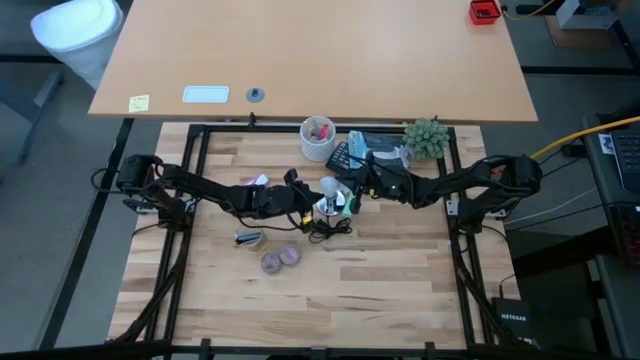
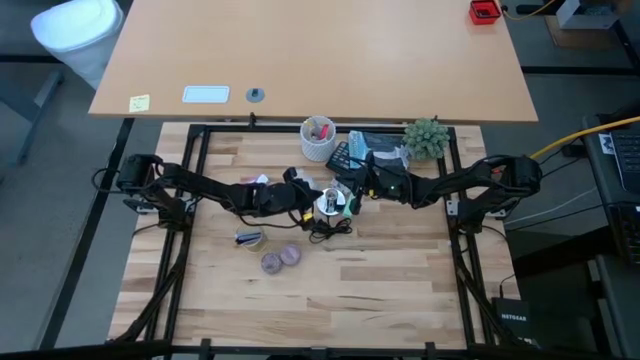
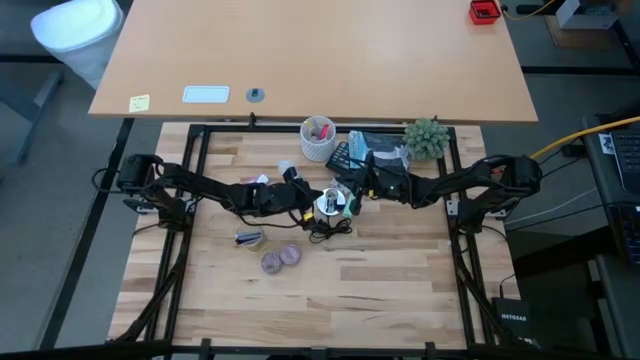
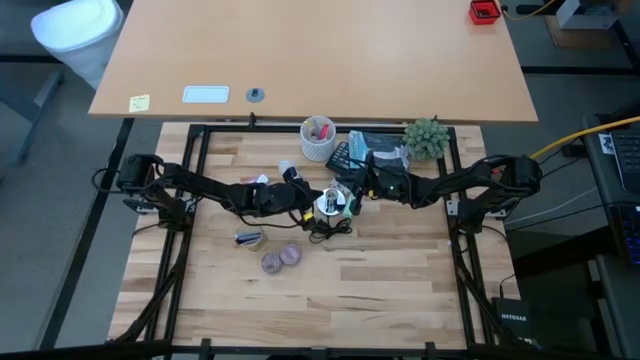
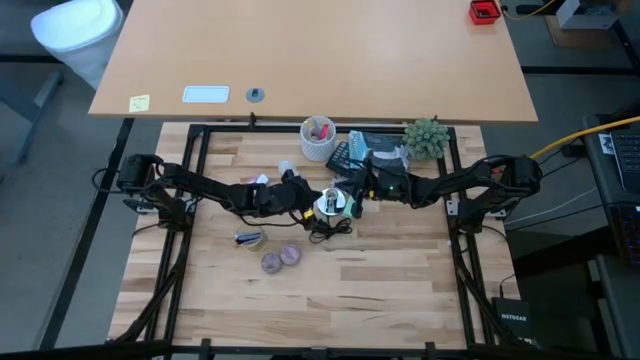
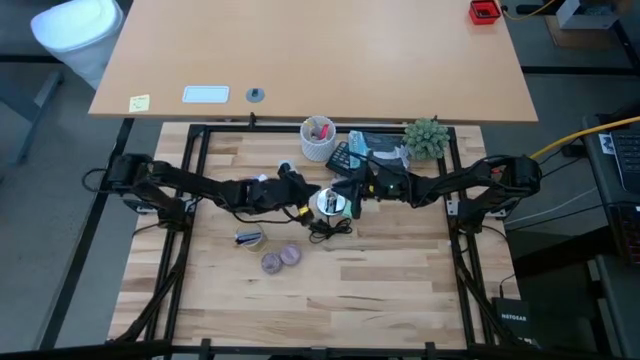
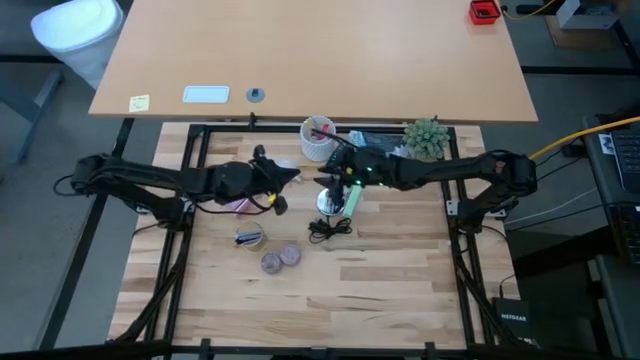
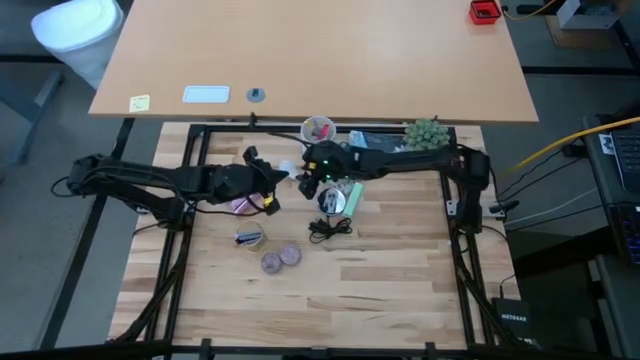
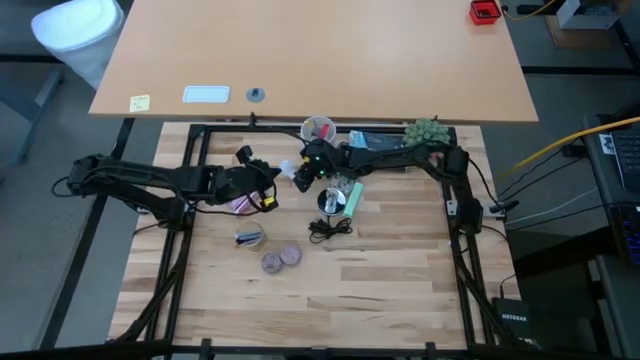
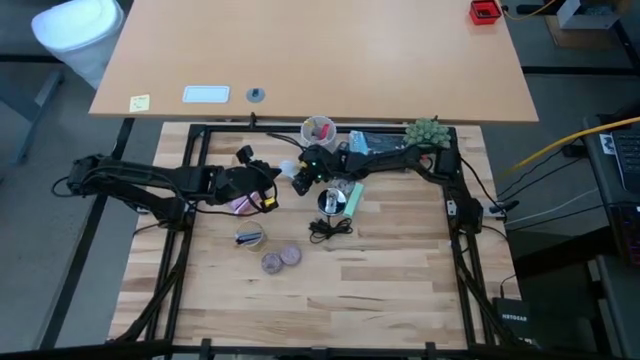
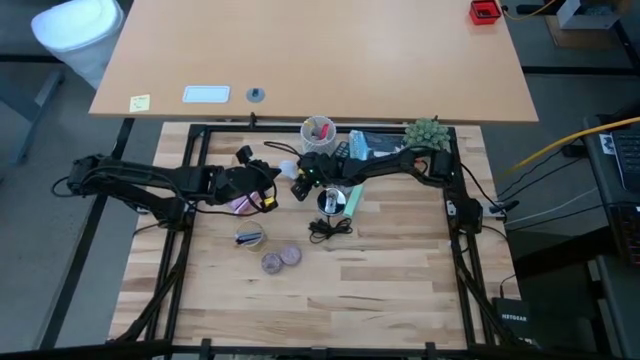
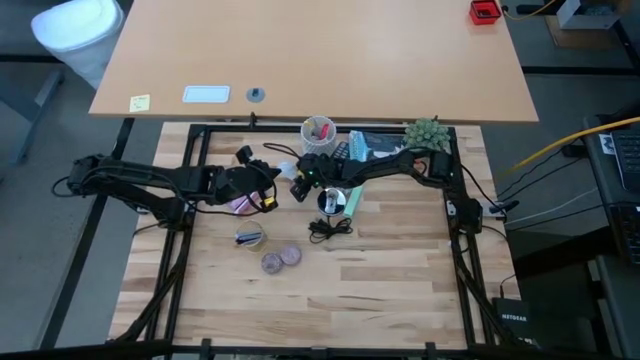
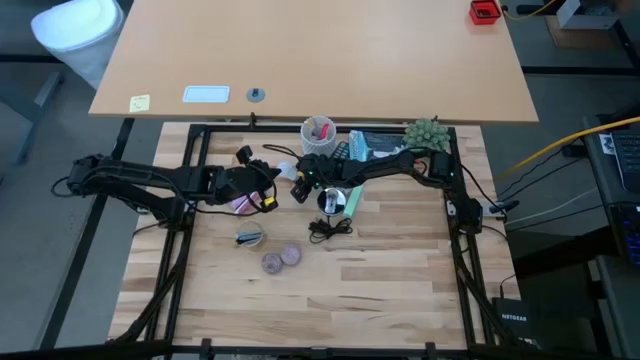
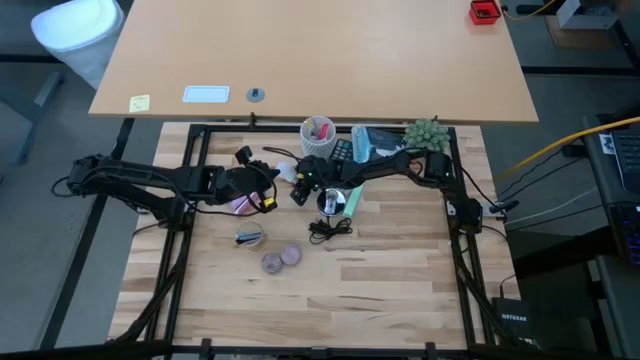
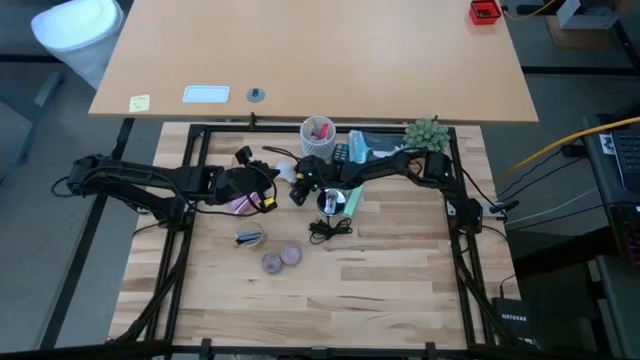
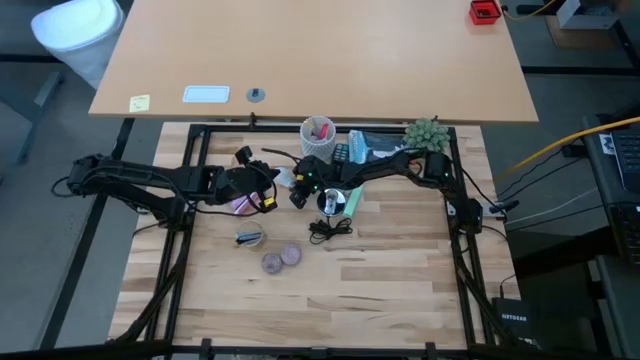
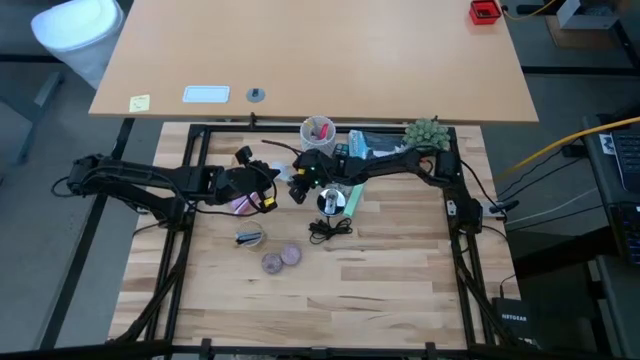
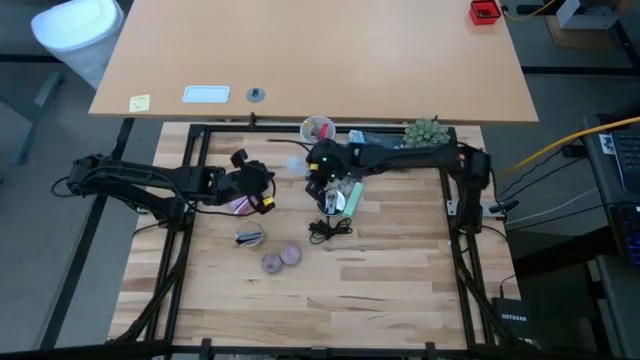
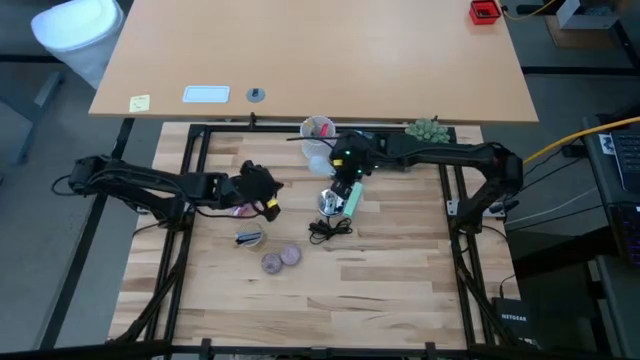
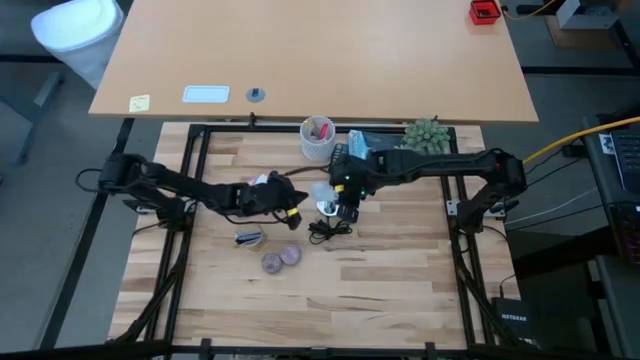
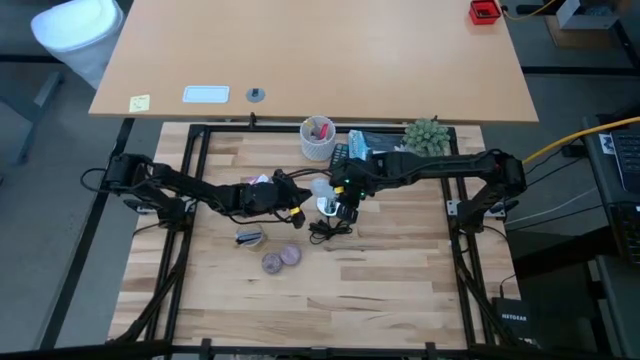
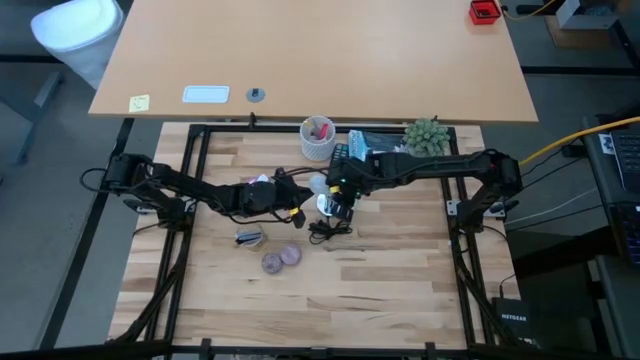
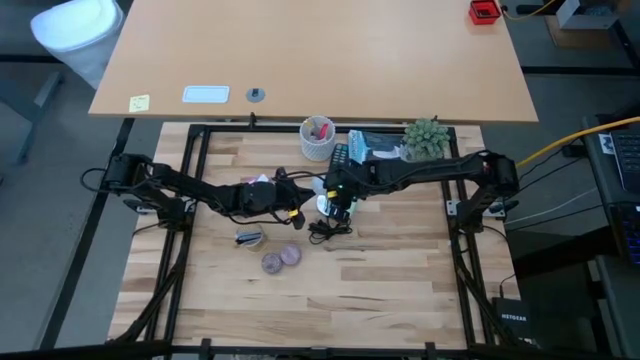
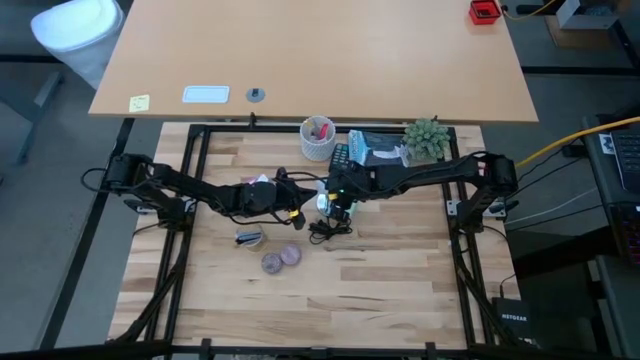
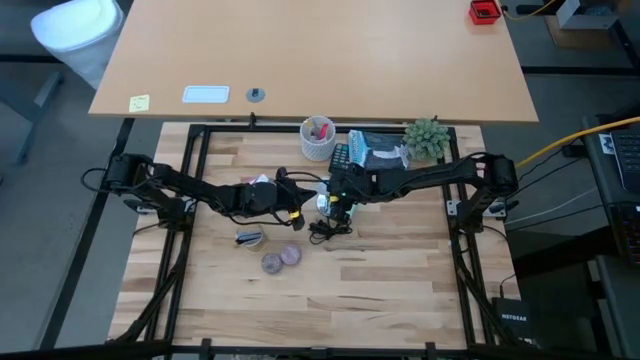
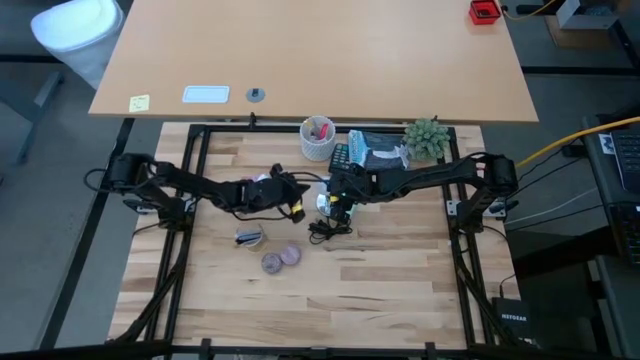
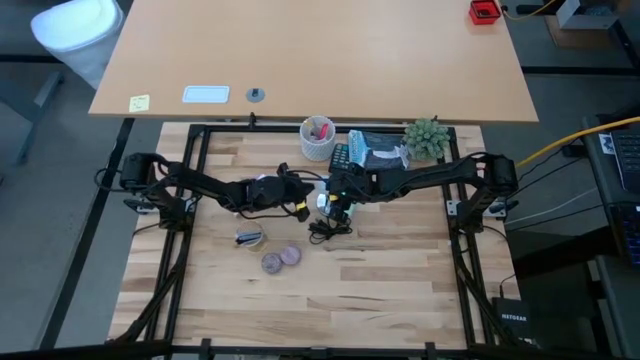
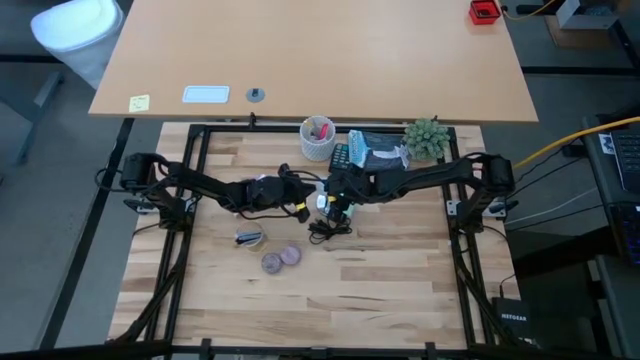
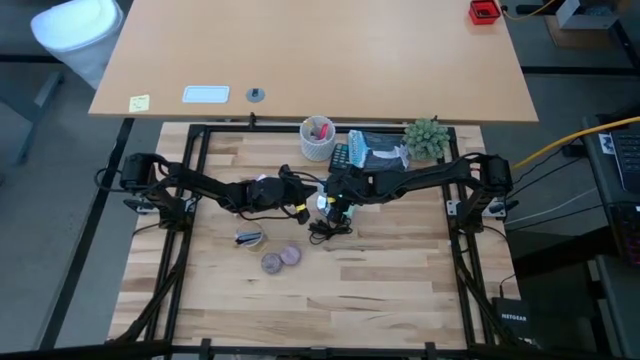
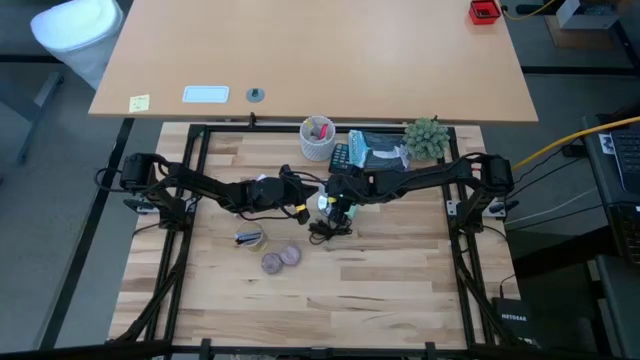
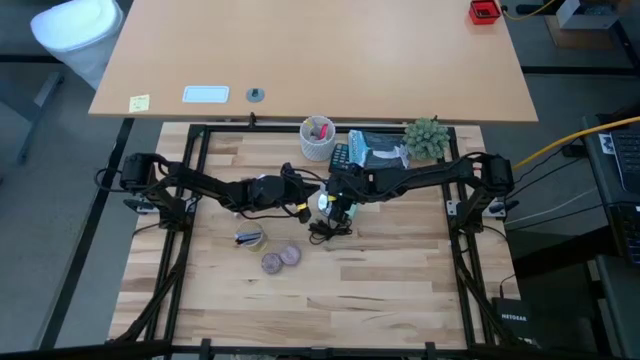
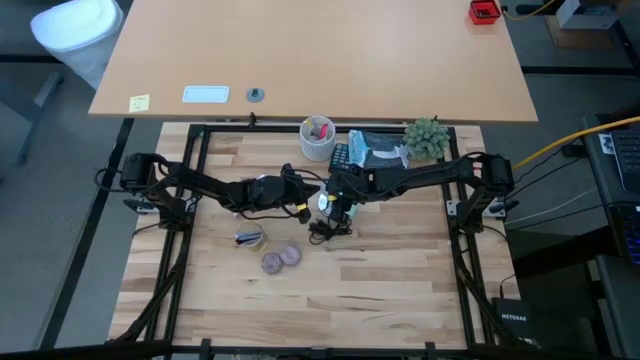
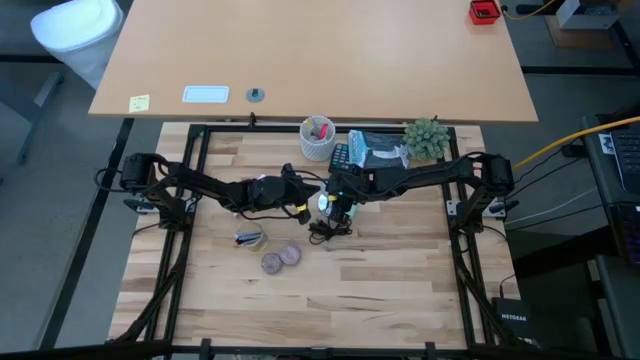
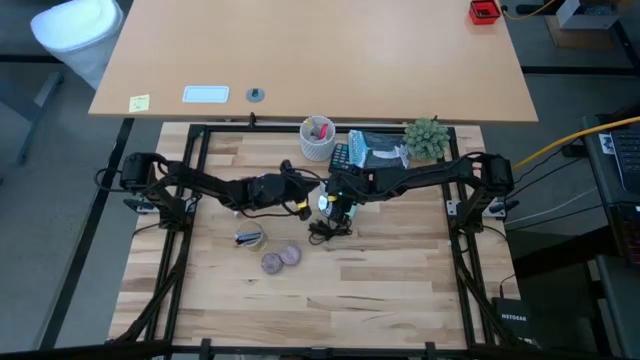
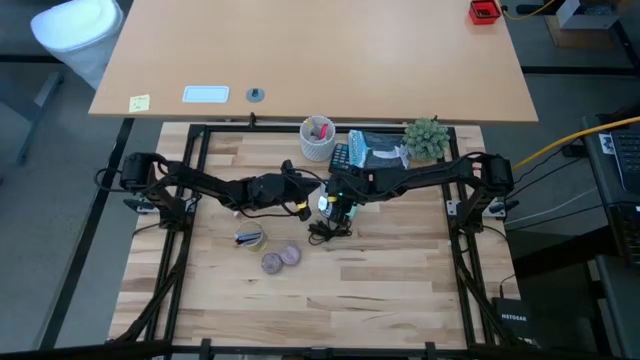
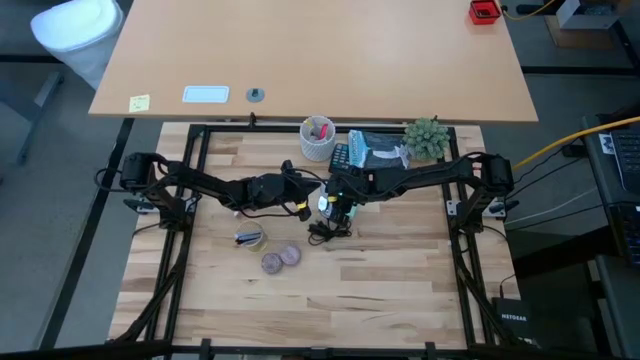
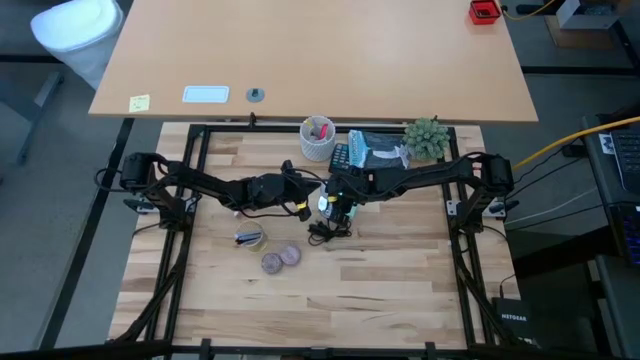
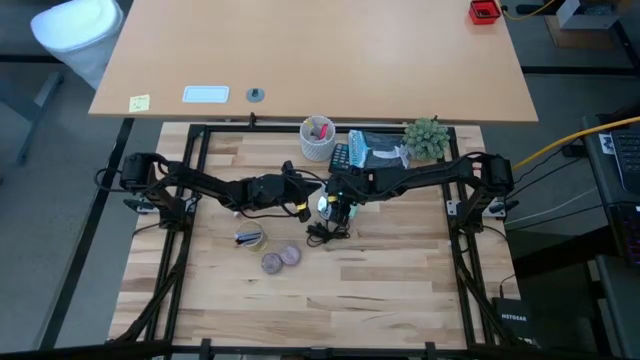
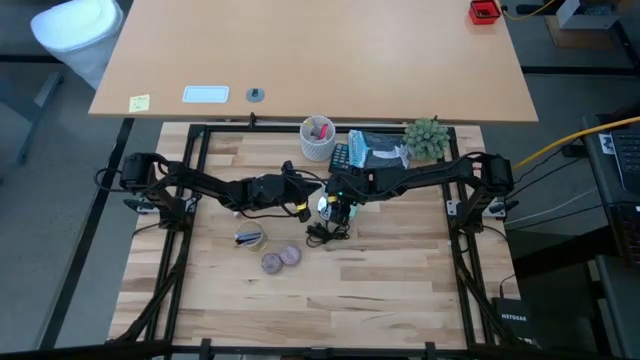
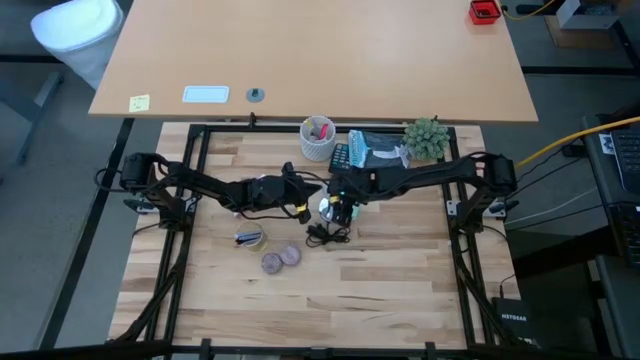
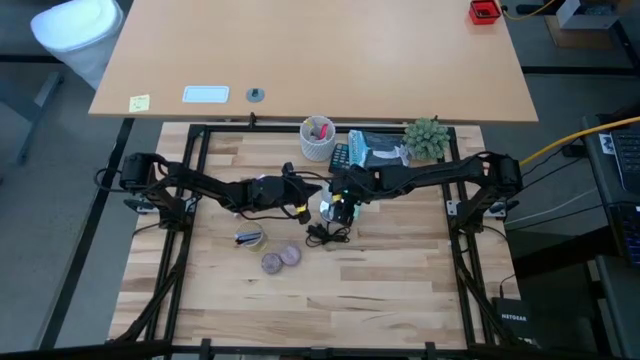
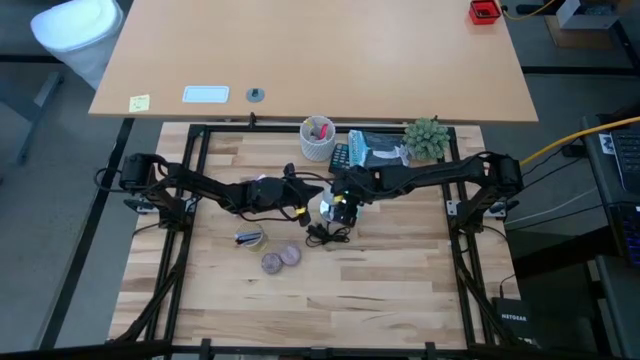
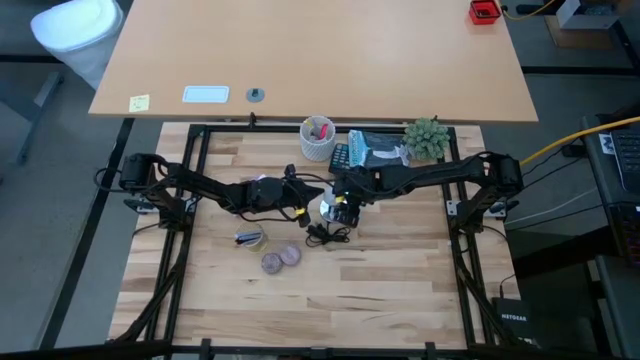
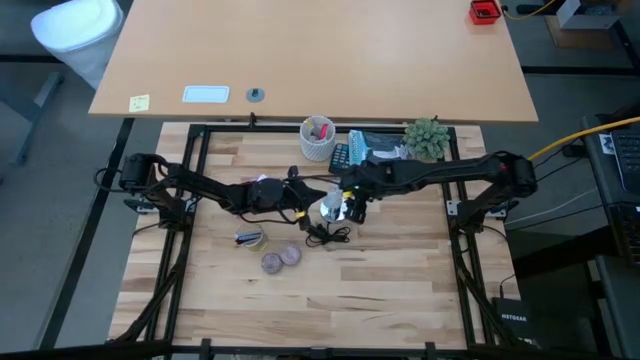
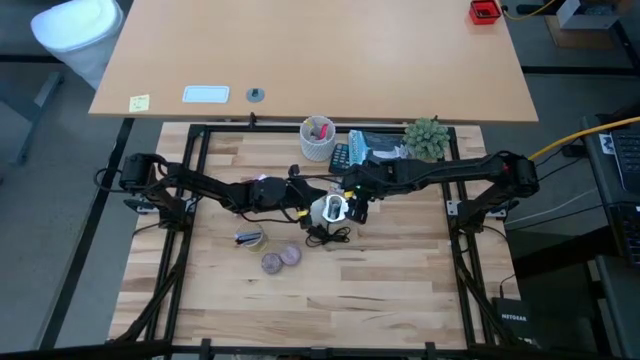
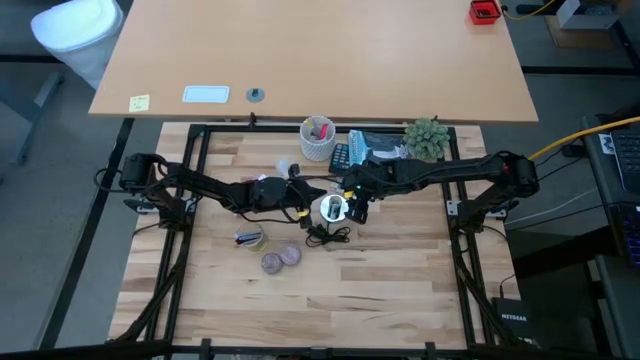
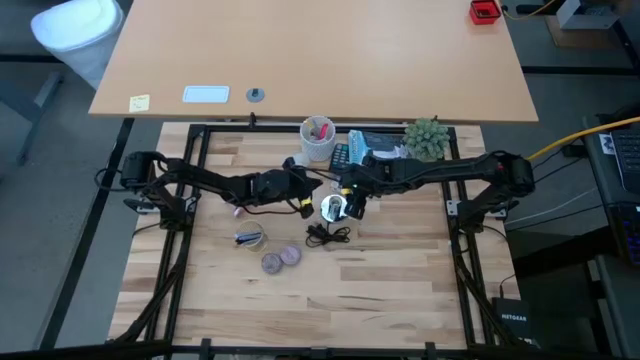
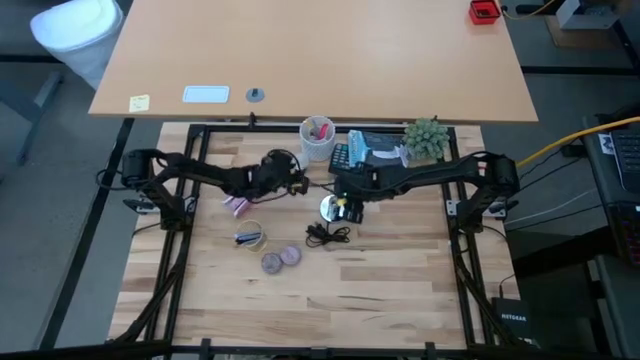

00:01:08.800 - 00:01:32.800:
Task: Screw lightbulb
Insert the white lightbulb into the silver lamp
